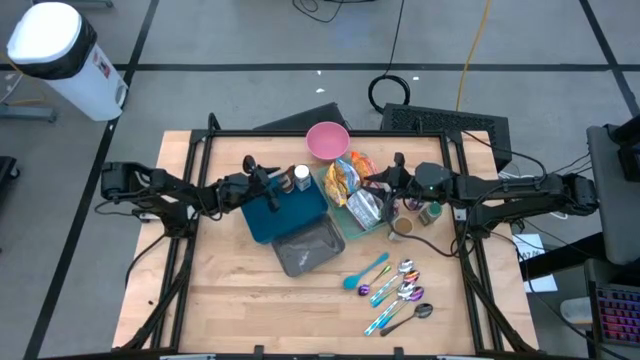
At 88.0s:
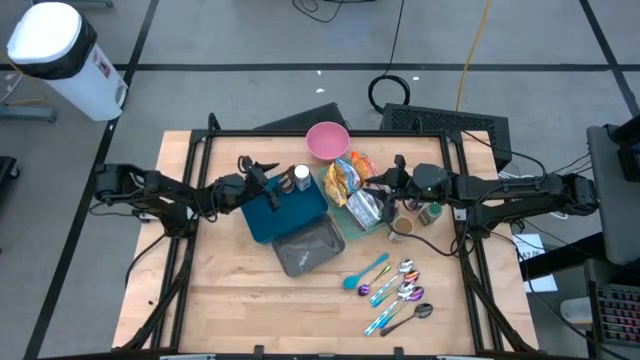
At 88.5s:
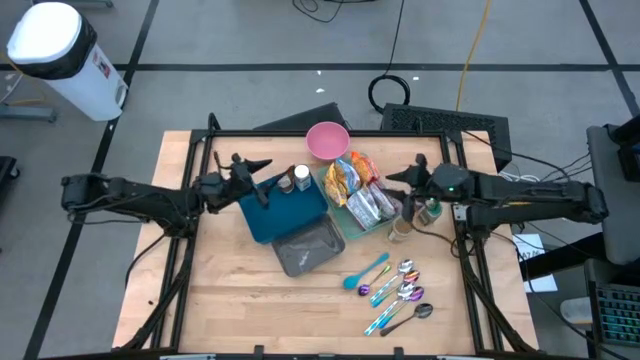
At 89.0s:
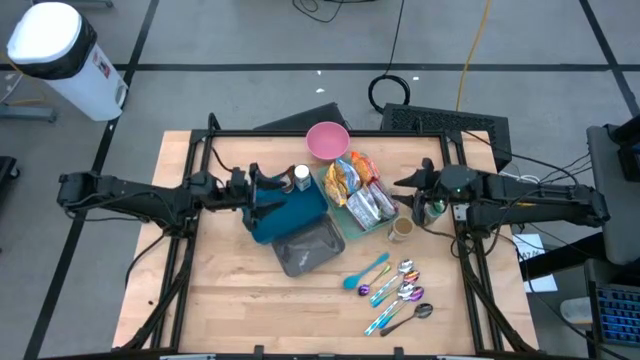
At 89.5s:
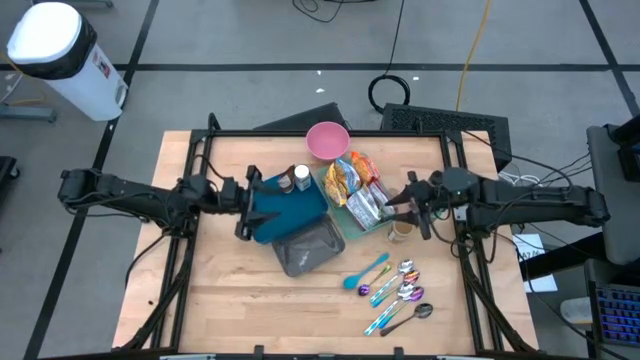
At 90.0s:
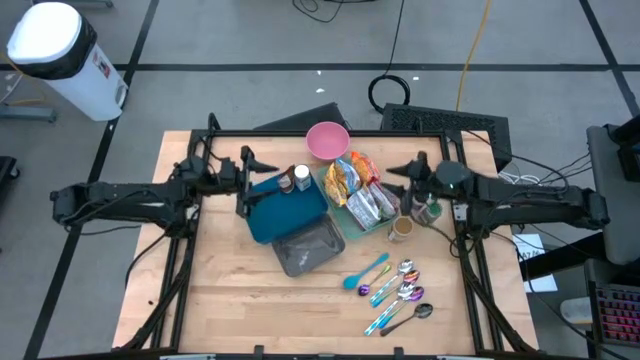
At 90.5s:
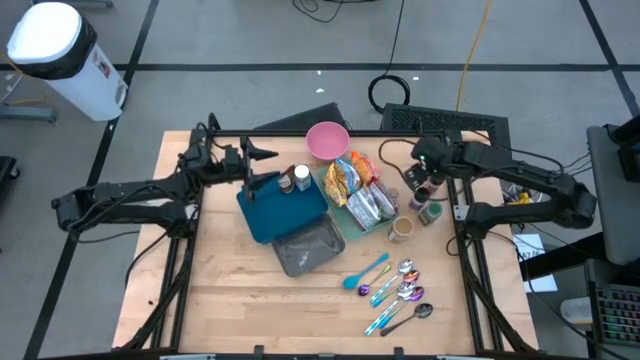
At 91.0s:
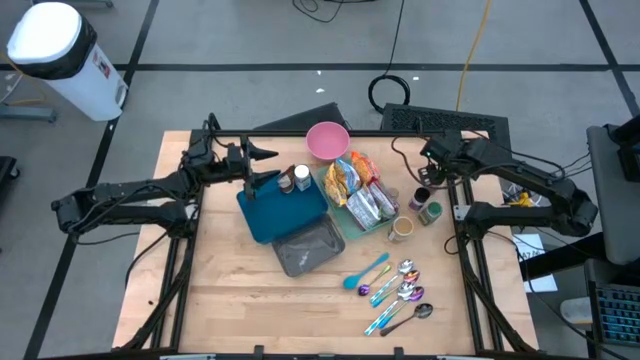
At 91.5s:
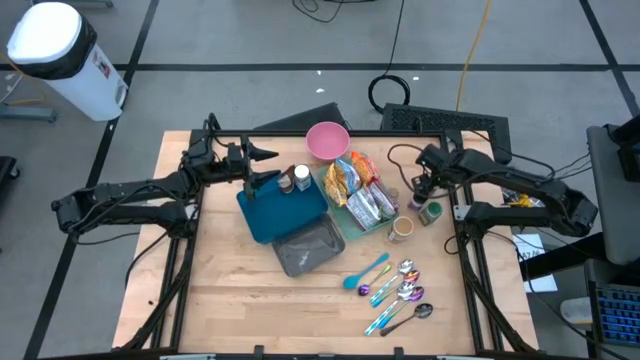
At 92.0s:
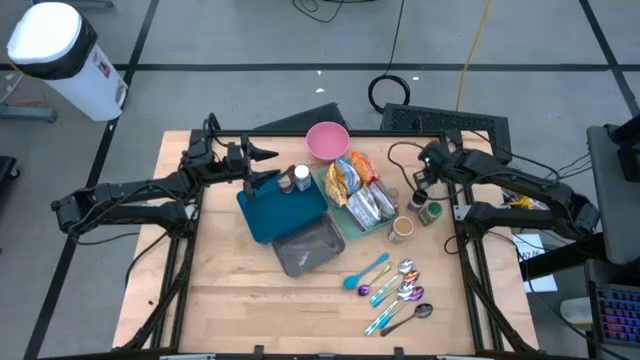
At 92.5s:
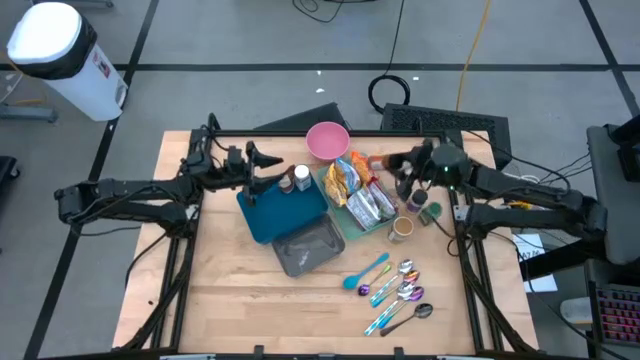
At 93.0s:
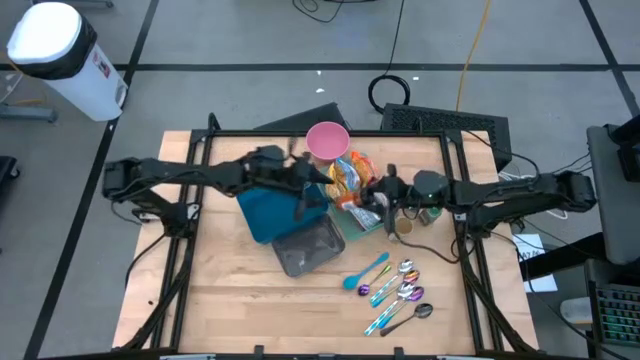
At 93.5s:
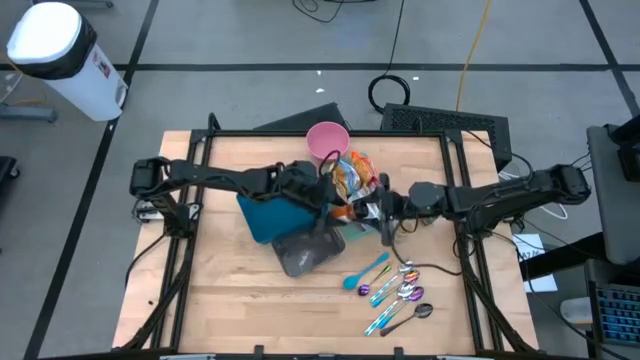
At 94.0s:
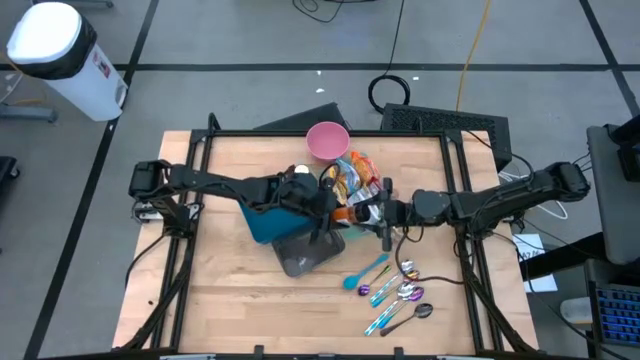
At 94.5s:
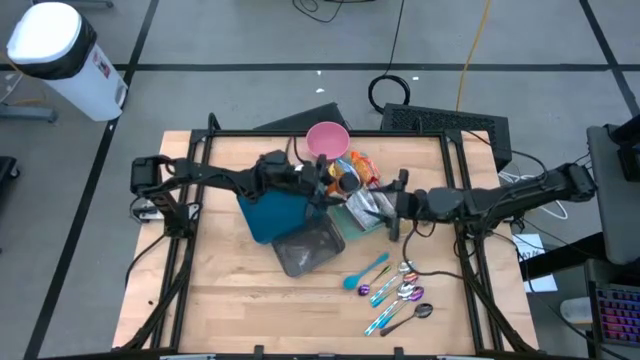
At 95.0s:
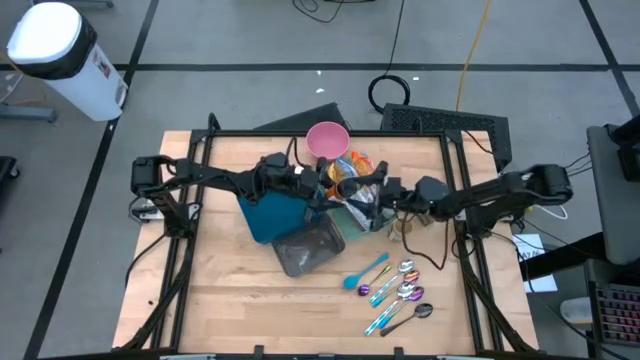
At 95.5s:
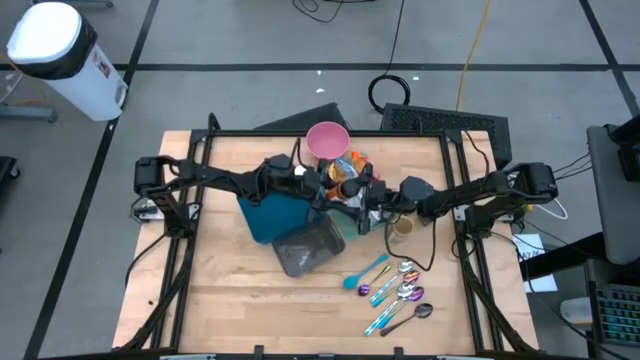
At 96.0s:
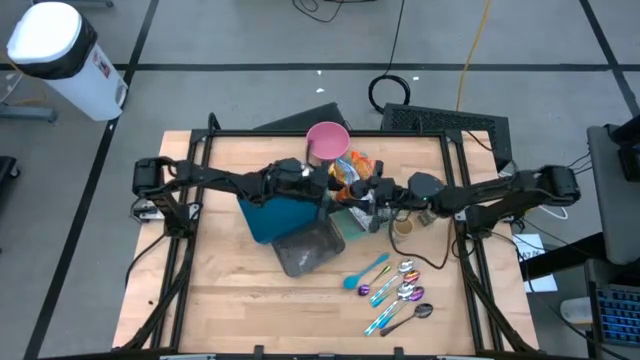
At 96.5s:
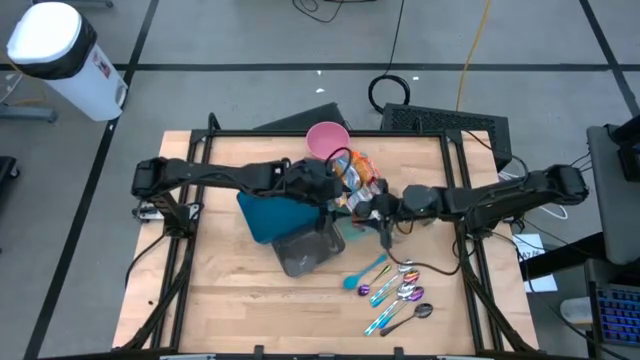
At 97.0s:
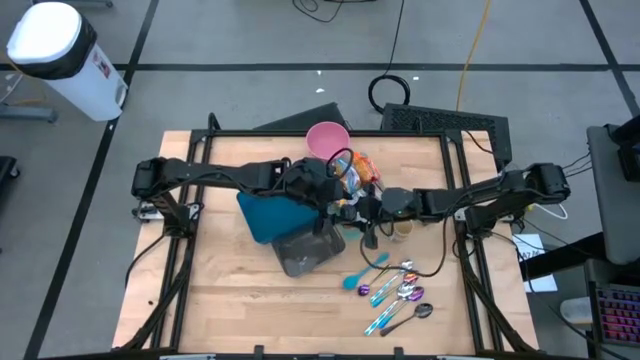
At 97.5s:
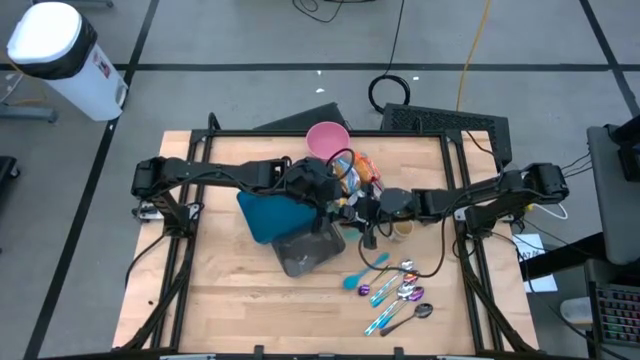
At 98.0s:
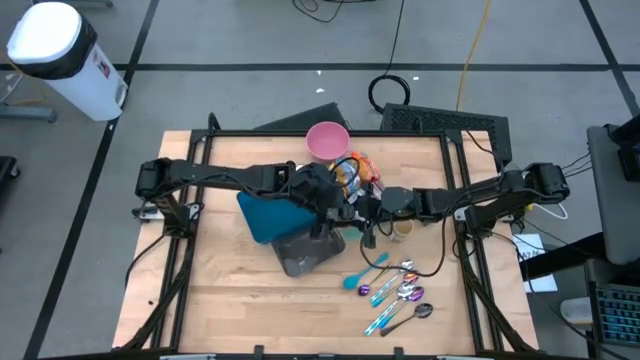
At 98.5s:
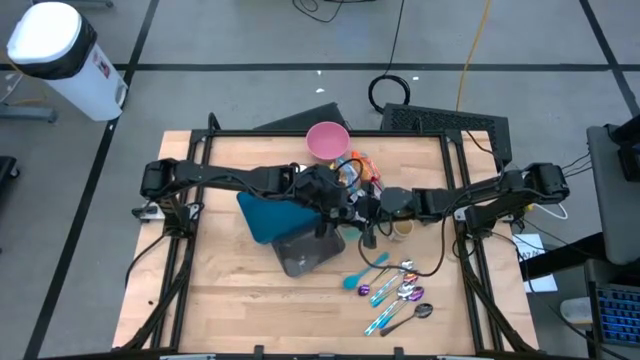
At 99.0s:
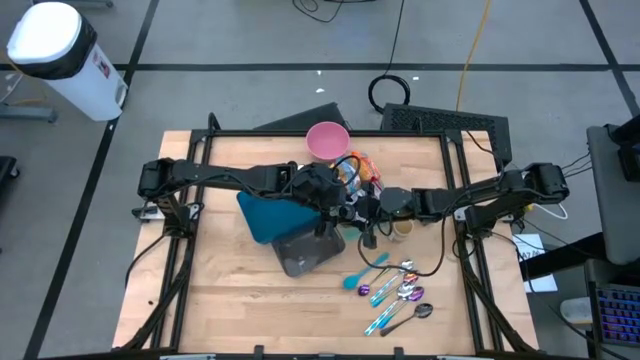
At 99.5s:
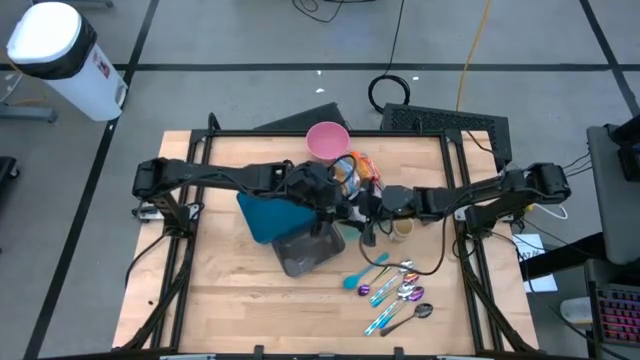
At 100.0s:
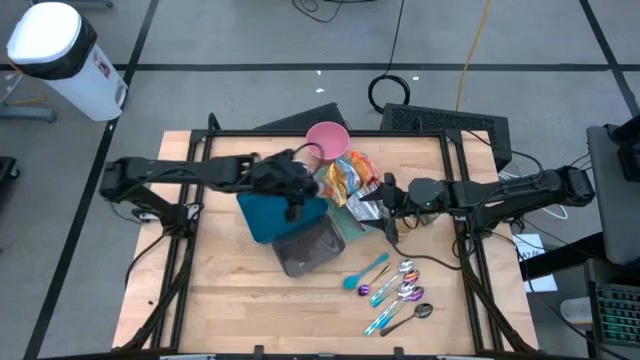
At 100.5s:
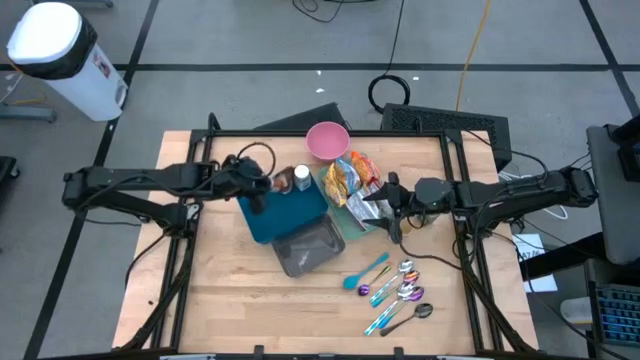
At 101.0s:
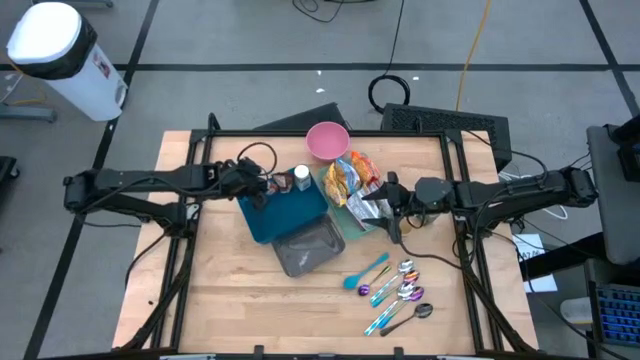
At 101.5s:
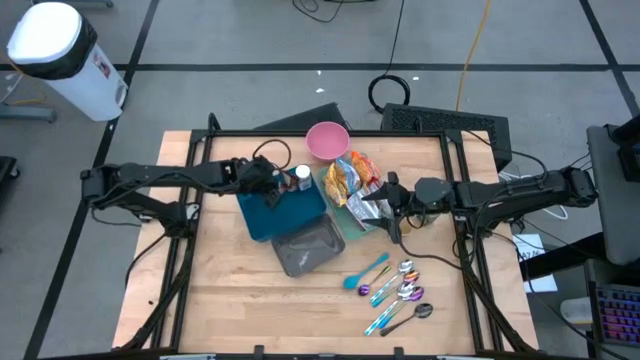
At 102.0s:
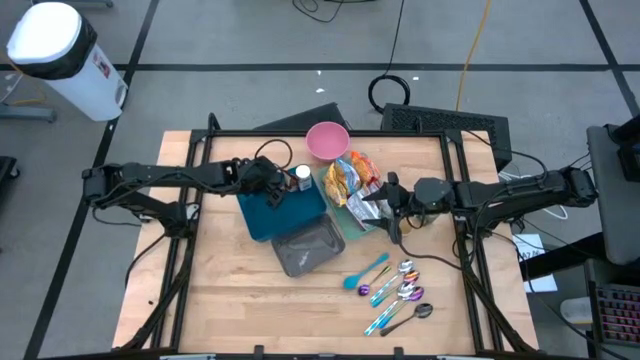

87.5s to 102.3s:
Task: Pick & Place Food Item
Put the orange seasoning bottle into the blue bin

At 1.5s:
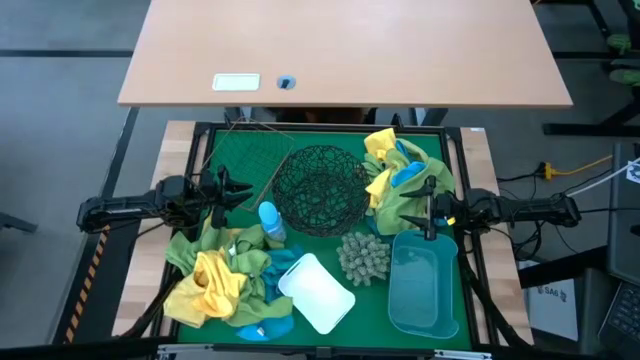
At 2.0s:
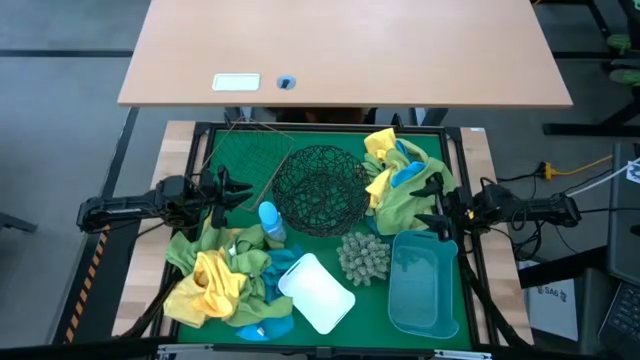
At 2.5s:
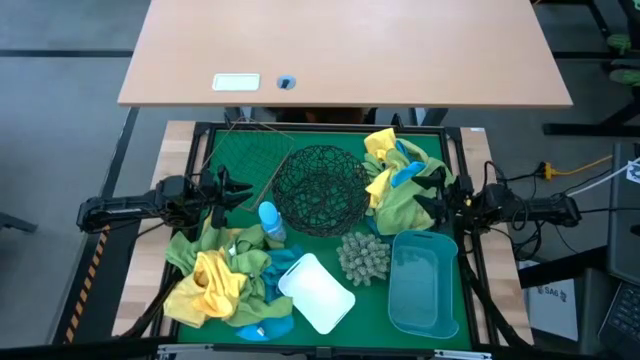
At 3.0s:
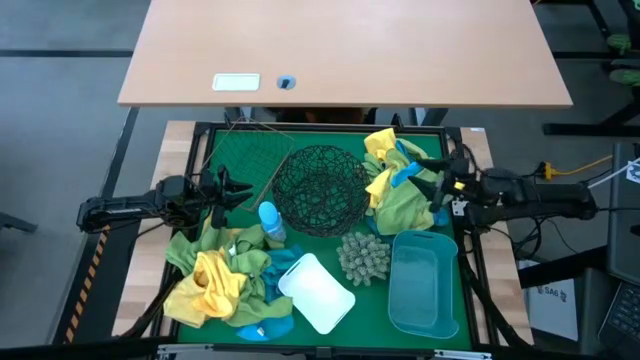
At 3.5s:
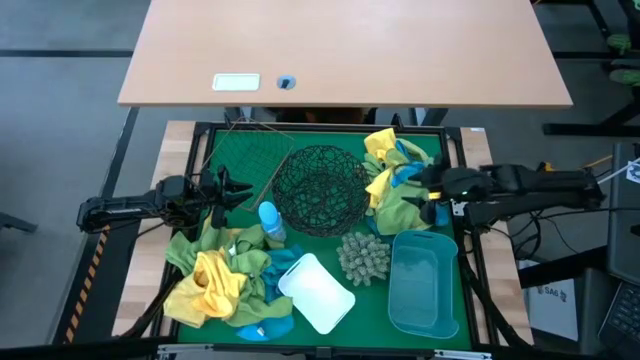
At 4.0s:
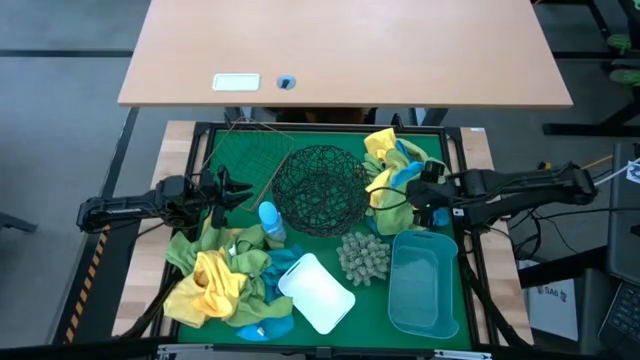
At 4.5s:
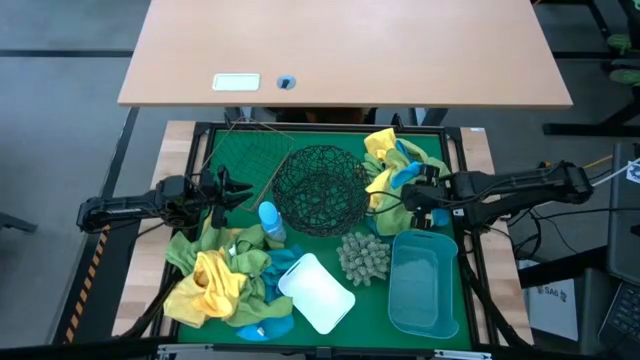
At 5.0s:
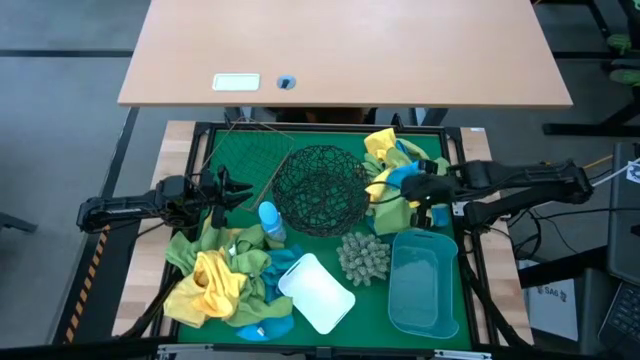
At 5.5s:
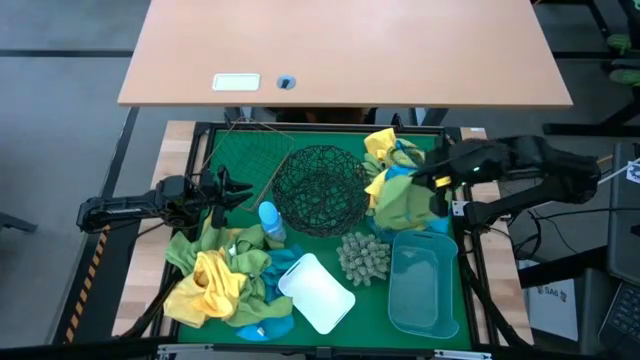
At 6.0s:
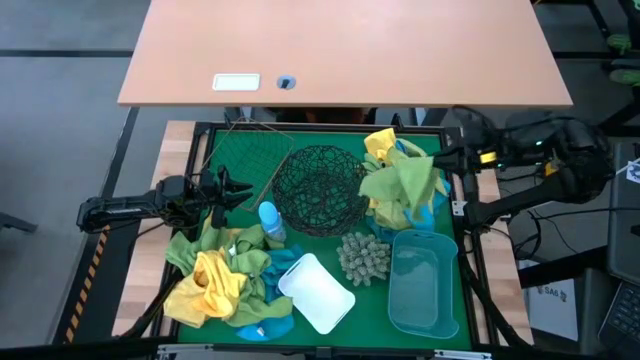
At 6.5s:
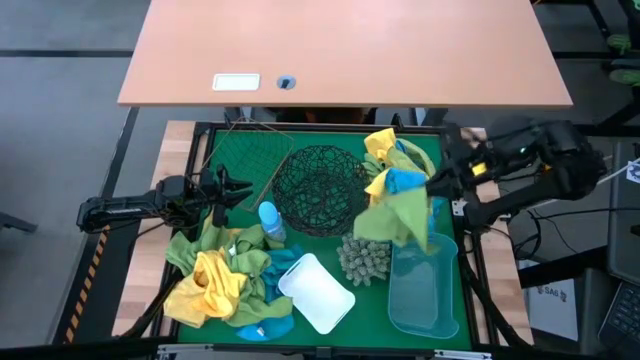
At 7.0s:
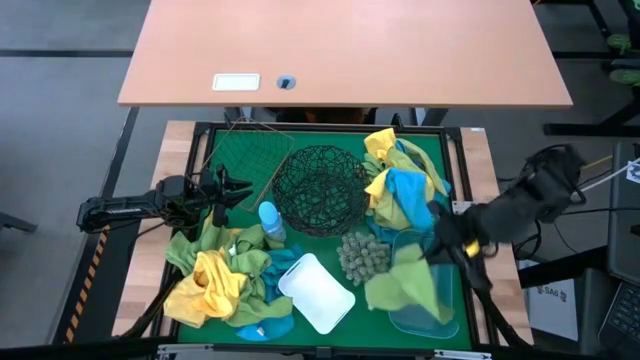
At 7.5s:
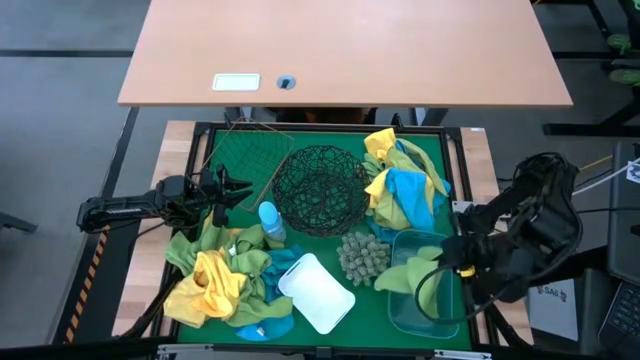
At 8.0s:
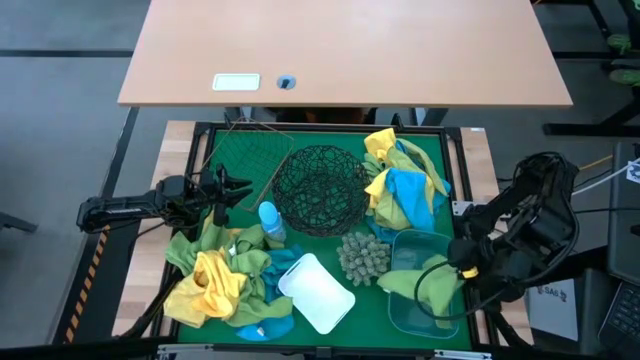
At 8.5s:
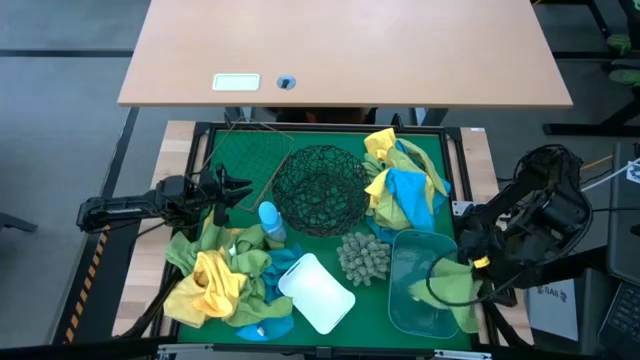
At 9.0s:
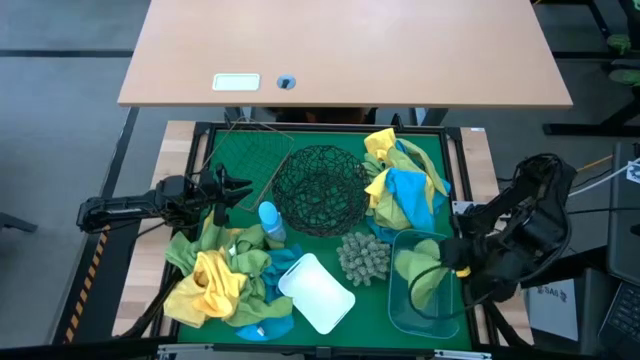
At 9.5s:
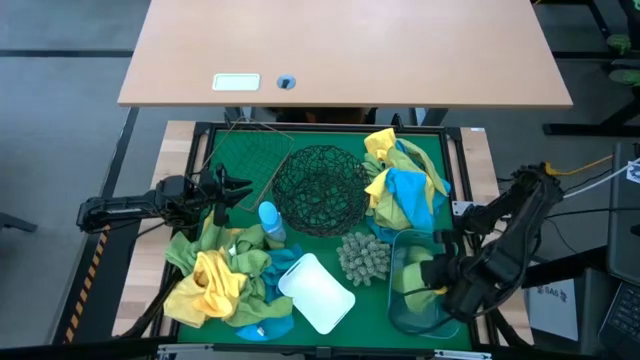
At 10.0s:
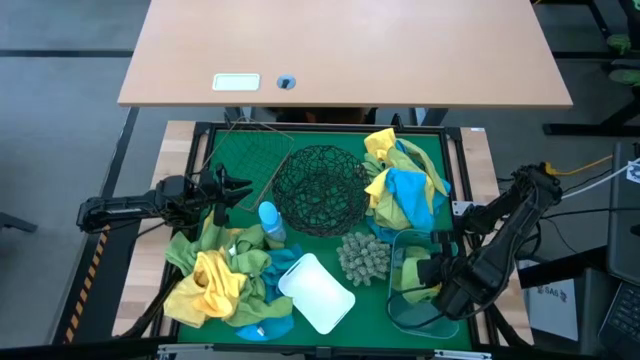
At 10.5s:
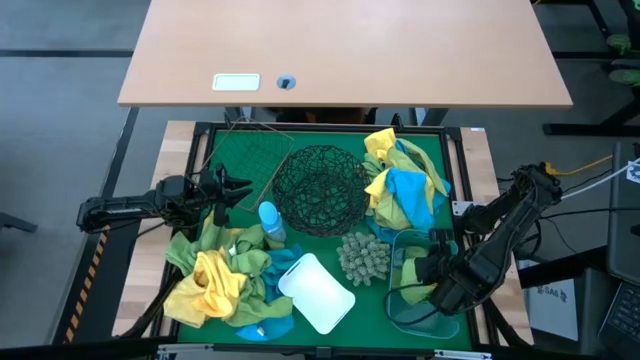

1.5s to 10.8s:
Task: Sort microfiber towel by color & place in baskets
Put the green microfiber cloth into the blue bin
